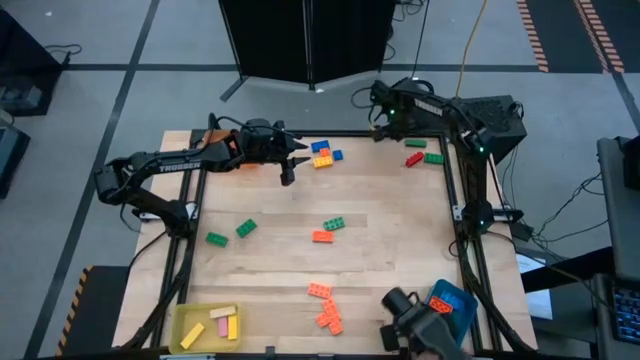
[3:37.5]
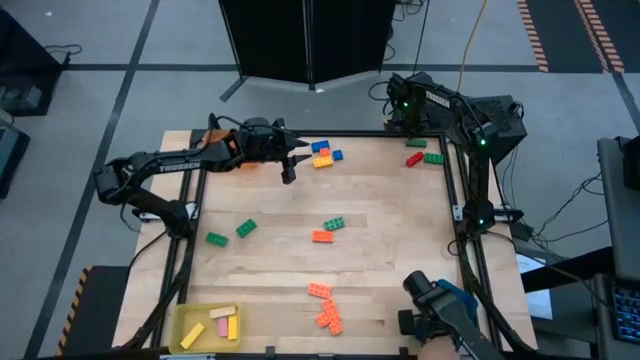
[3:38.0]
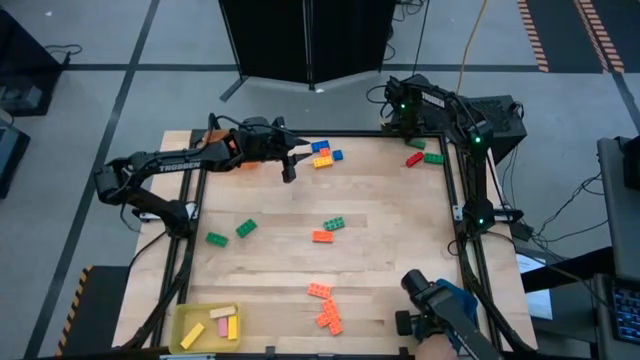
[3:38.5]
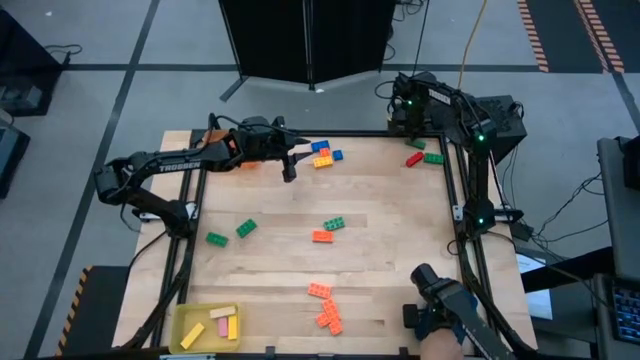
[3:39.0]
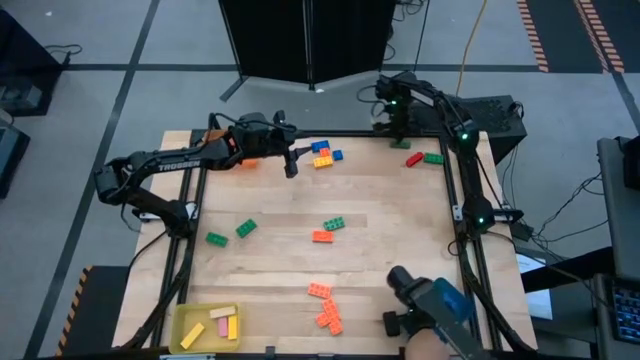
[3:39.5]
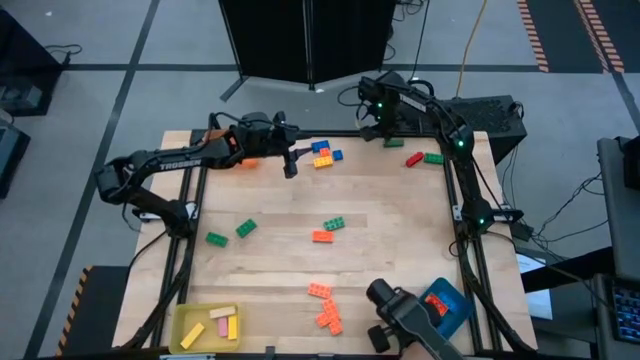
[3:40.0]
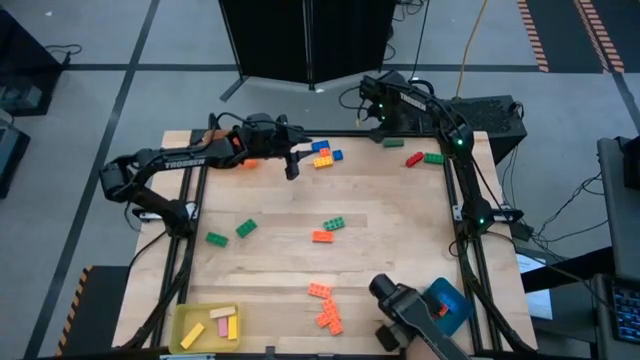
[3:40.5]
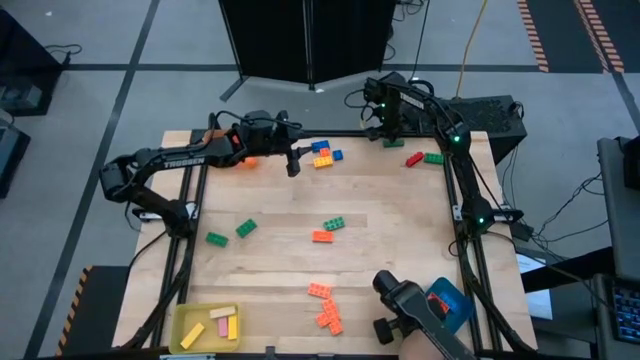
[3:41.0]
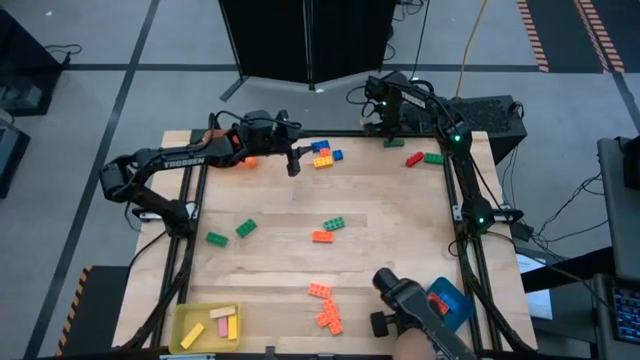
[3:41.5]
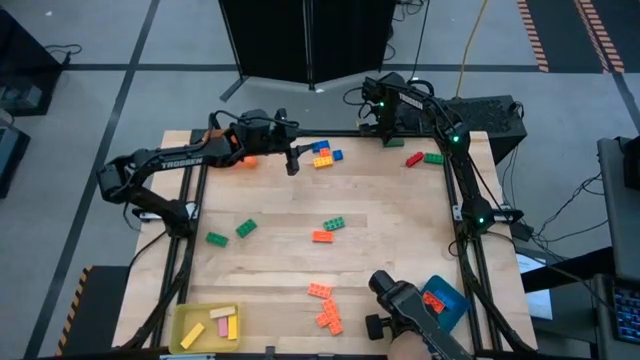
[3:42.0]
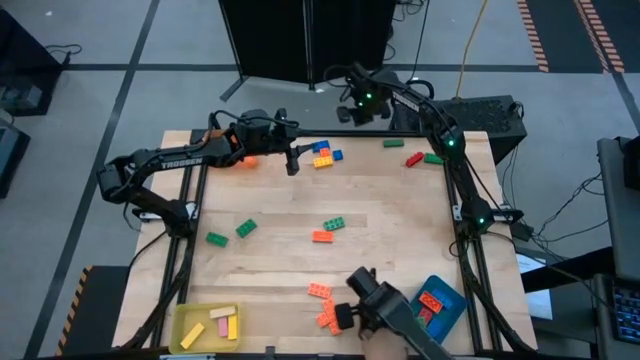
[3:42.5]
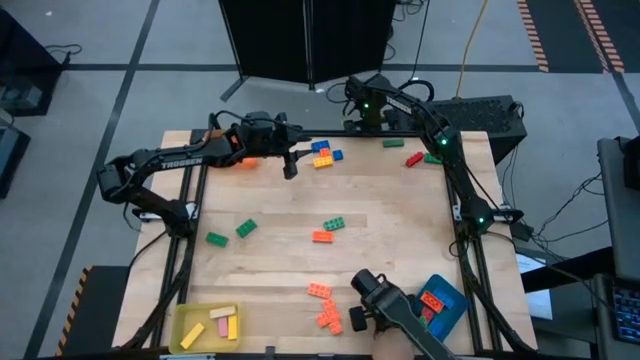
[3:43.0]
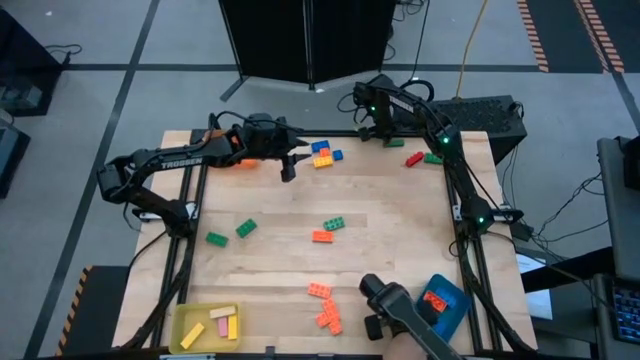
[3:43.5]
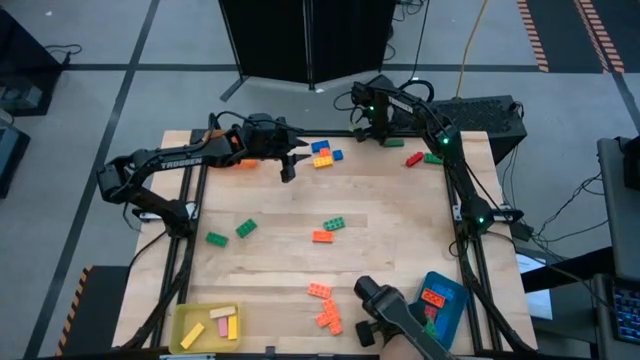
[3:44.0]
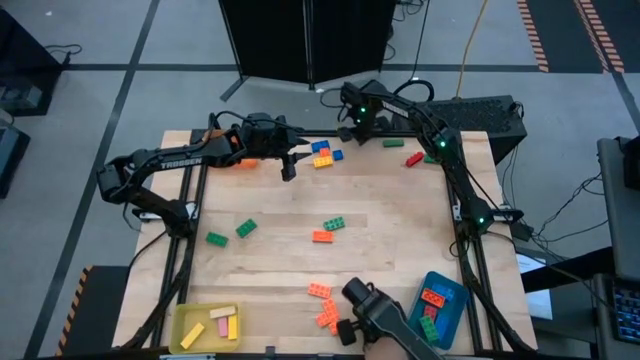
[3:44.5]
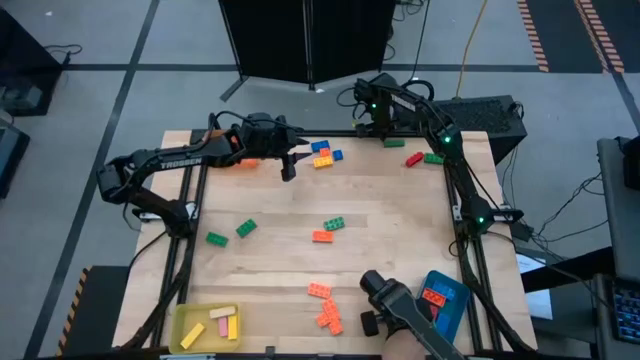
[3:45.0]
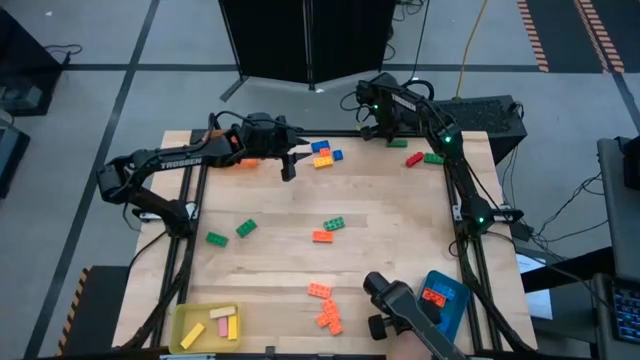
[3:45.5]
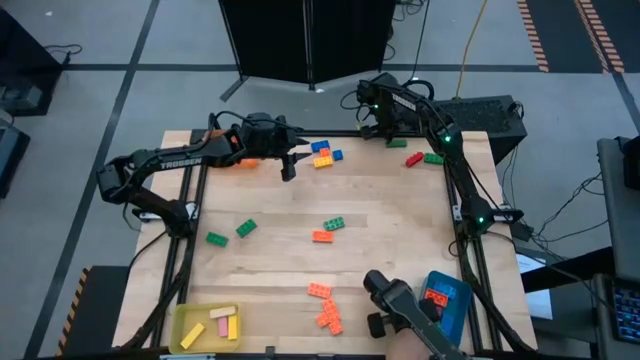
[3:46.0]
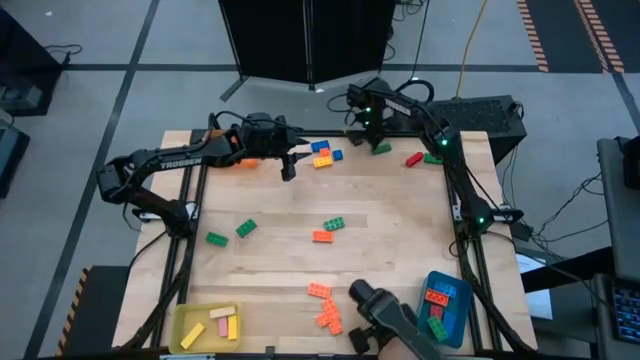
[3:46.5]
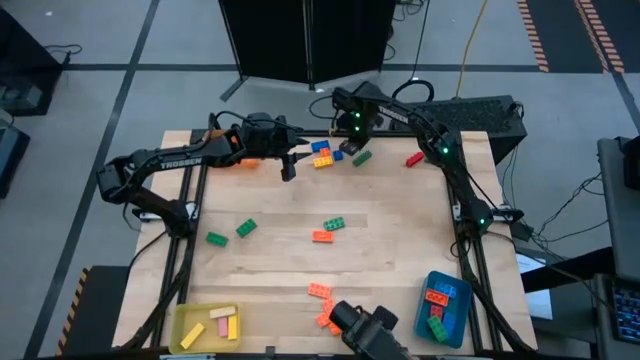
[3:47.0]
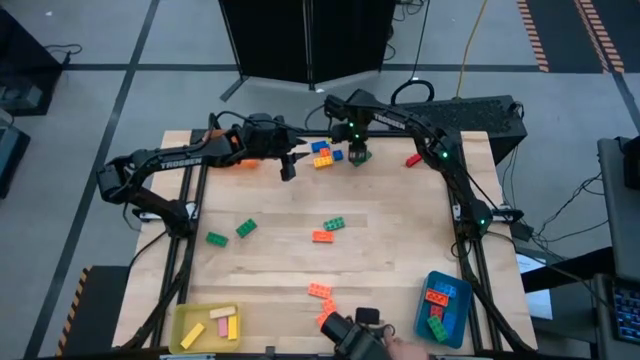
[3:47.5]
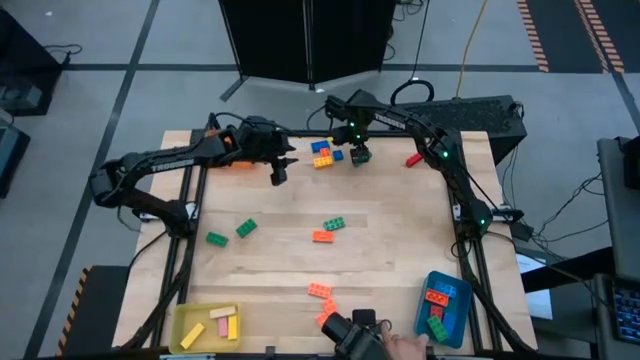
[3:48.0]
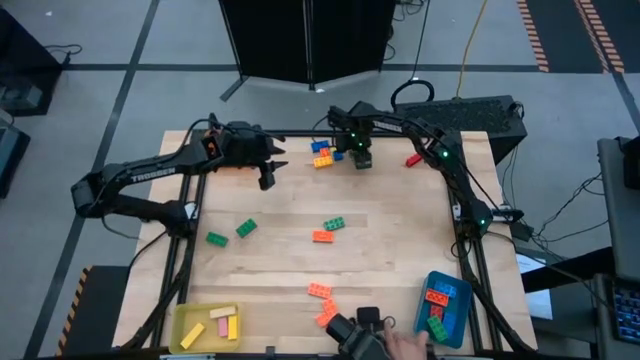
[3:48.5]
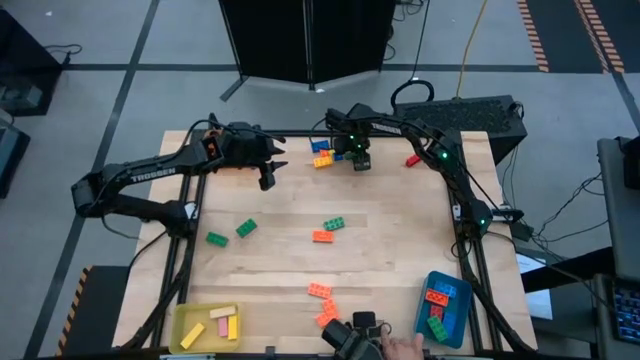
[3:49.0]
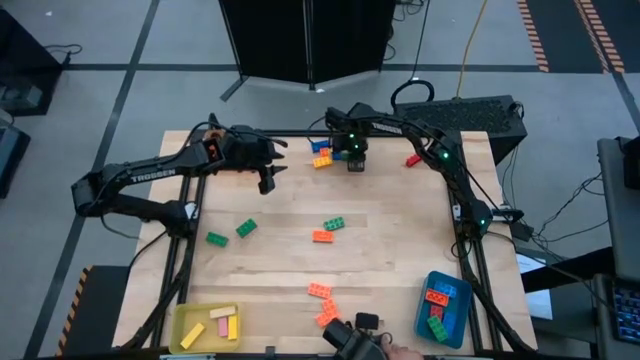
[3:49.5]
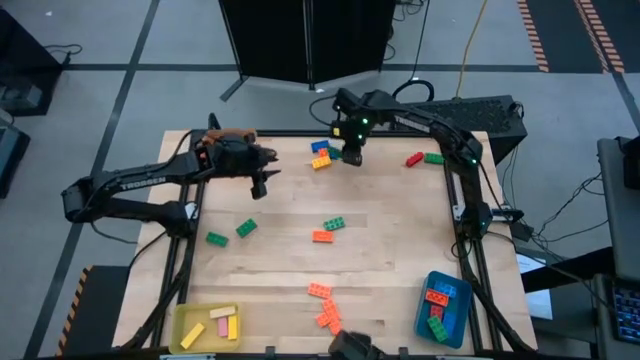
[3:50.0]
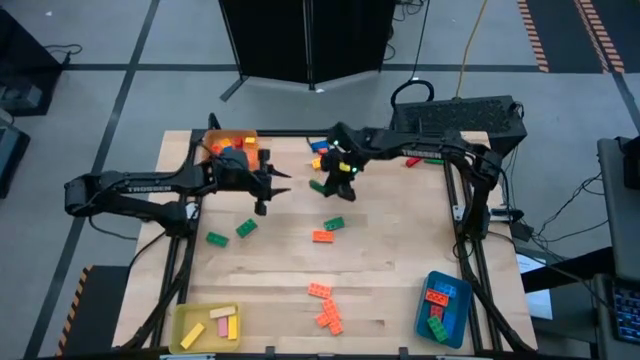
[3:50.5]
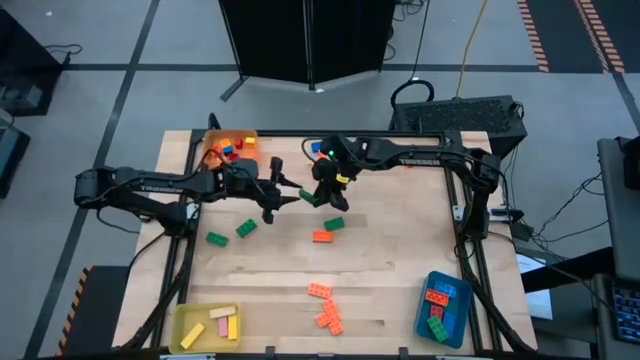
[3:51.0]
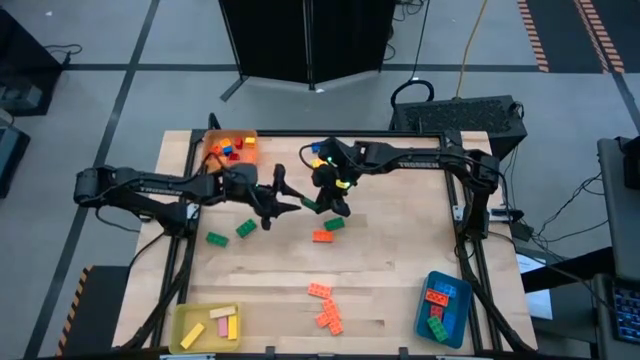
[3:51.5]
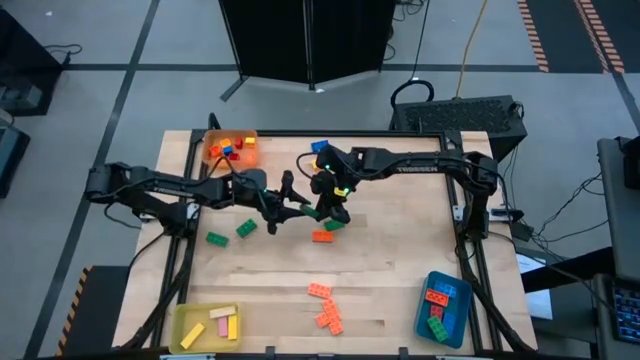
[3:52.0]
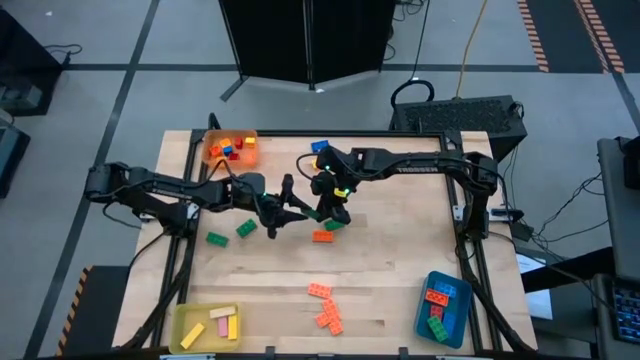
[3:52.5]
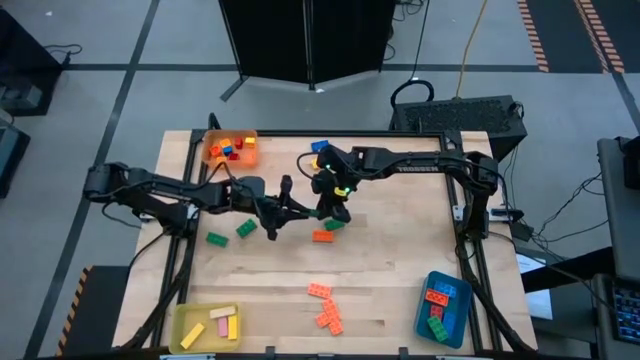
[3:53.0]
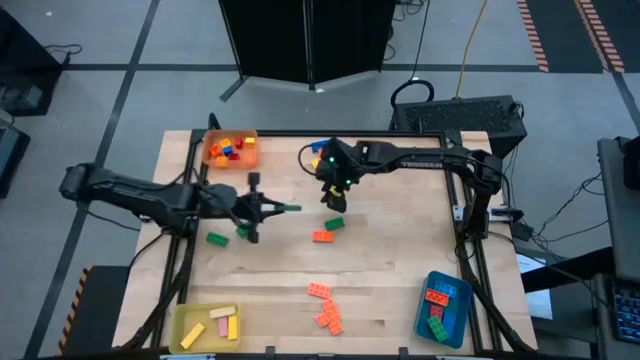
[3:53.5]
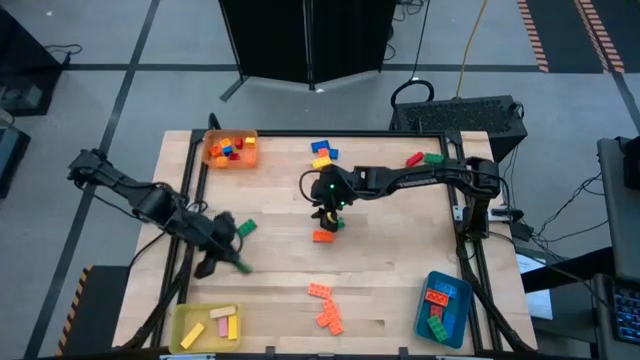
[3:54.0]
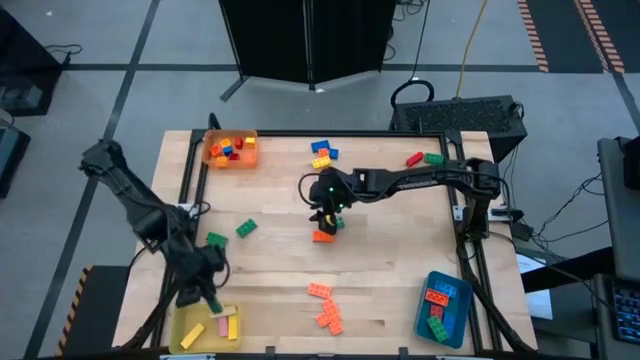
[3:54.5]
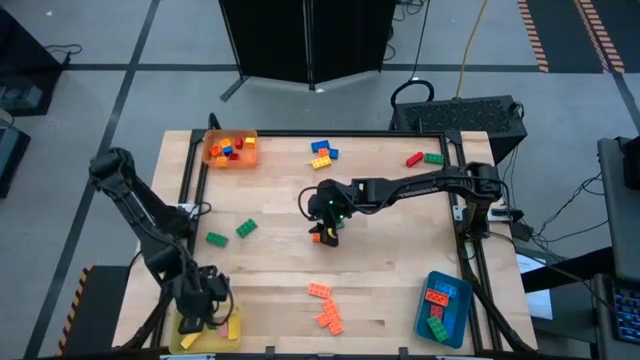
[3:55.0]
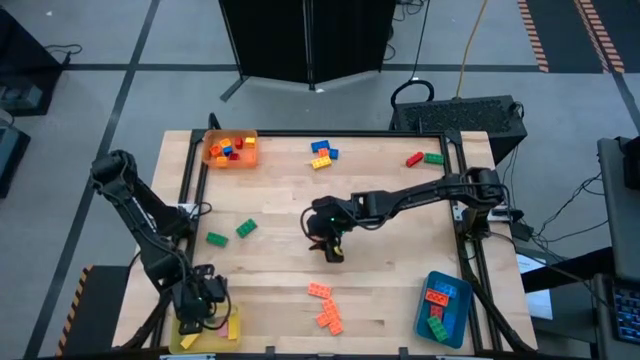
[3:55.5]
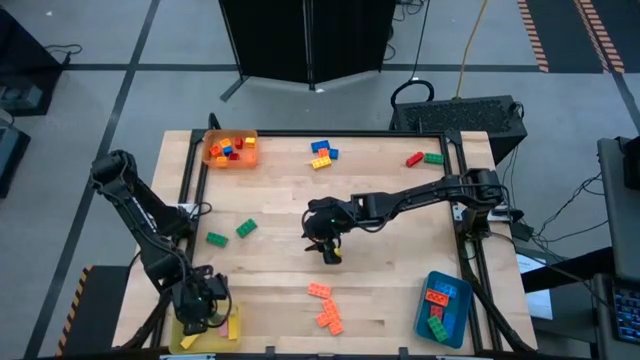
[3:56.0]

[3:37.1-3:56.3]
Task: Sort blocks by size
Put the green block into the yellow bin

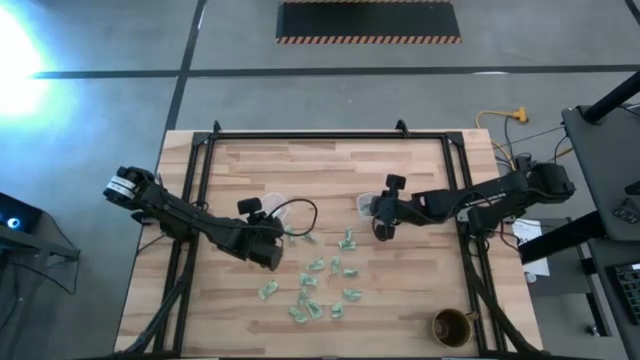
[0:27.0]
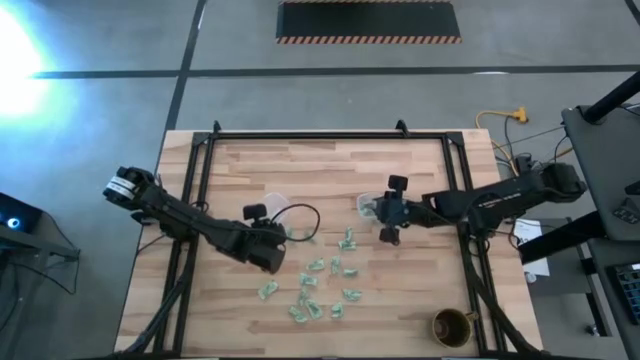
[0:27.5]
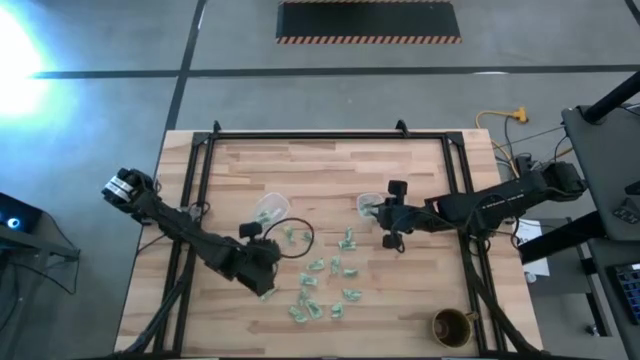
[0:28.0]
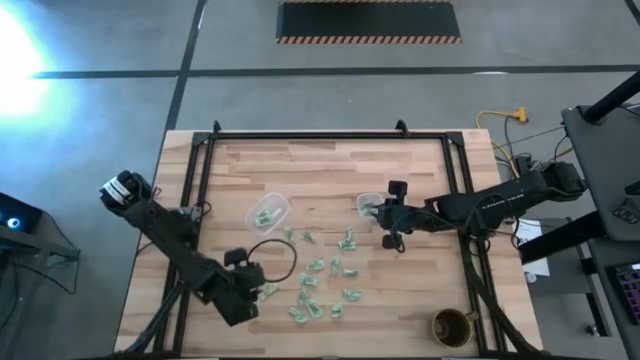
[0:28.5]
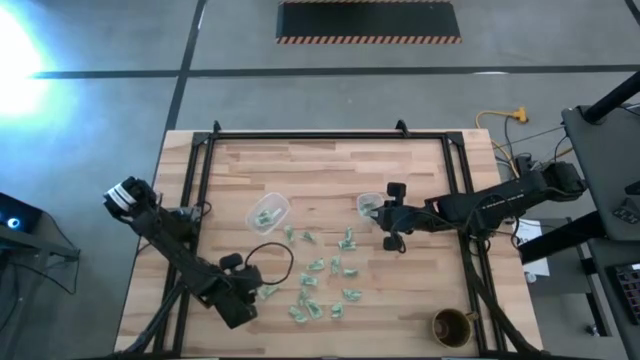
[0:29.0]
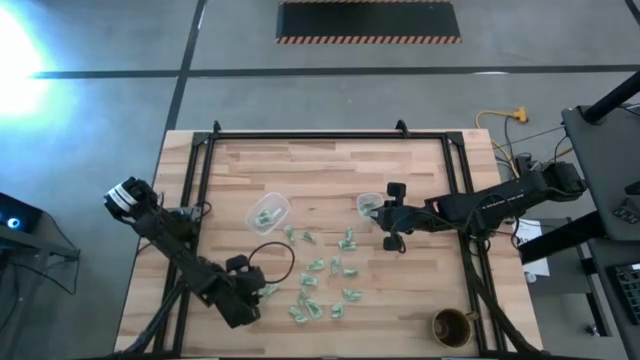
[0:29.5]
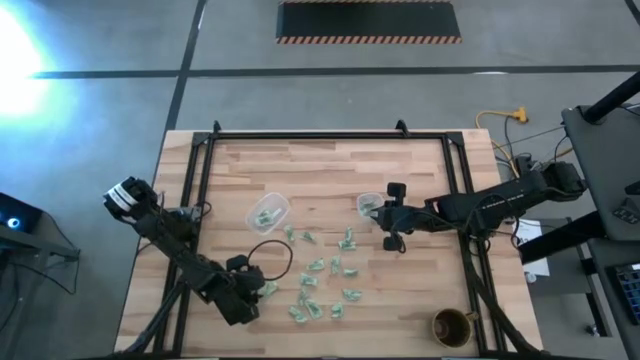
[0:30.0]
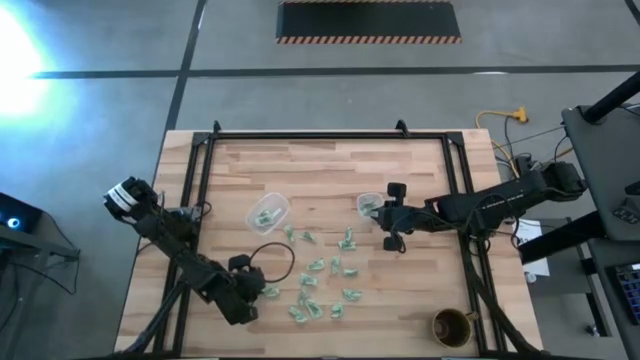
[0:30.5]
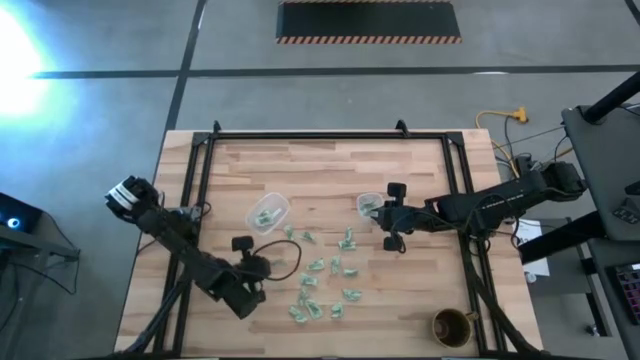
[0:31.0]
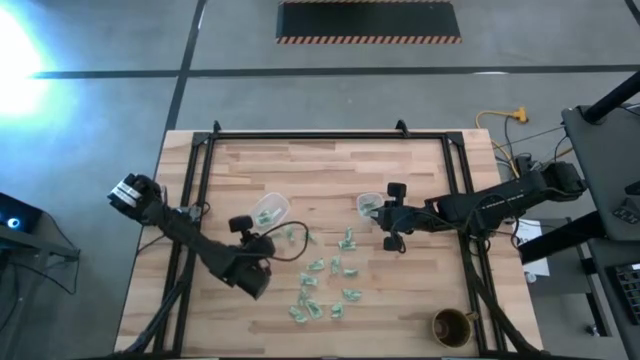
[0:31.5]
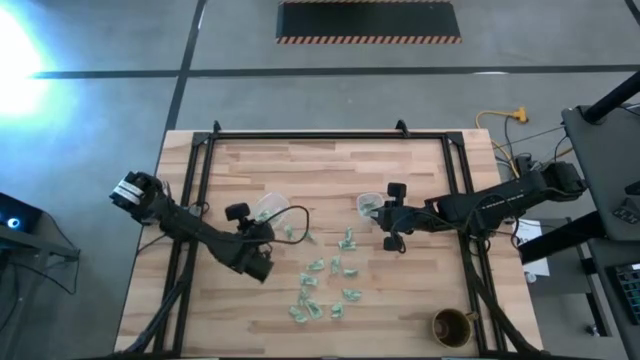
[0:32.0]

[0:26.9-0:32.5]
Task: Pick and place Stevia / Truvia into bins
Put the light green stevia packet into the left transparent container
